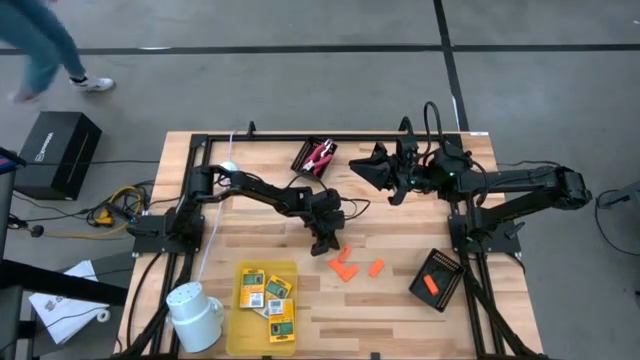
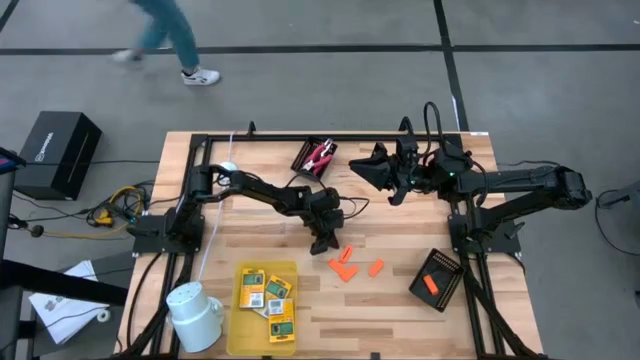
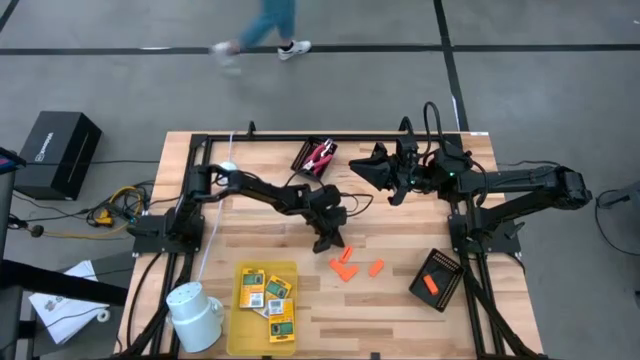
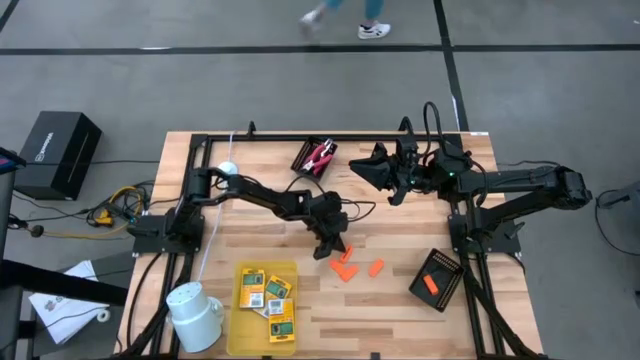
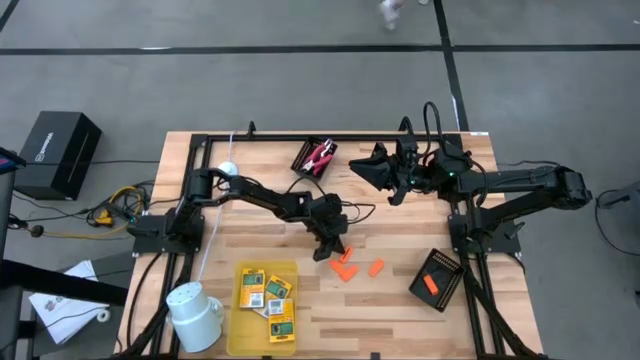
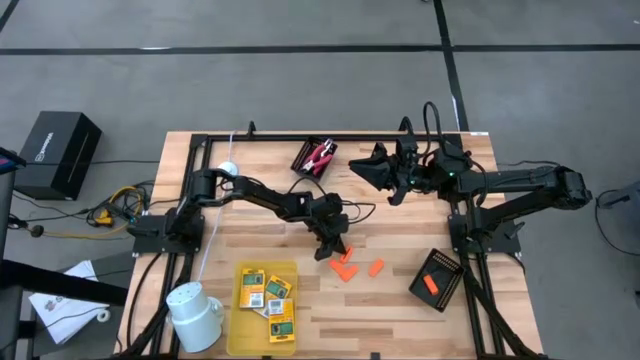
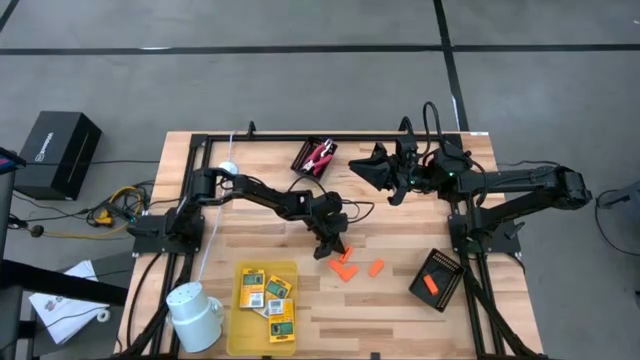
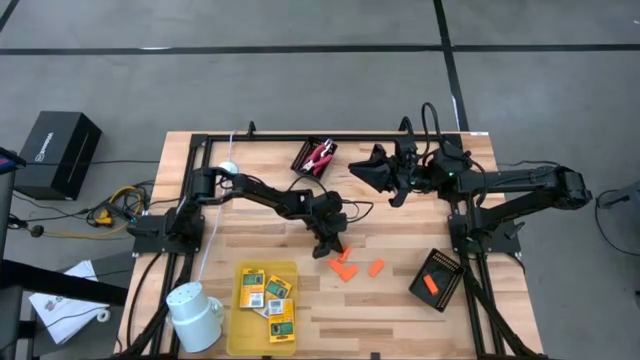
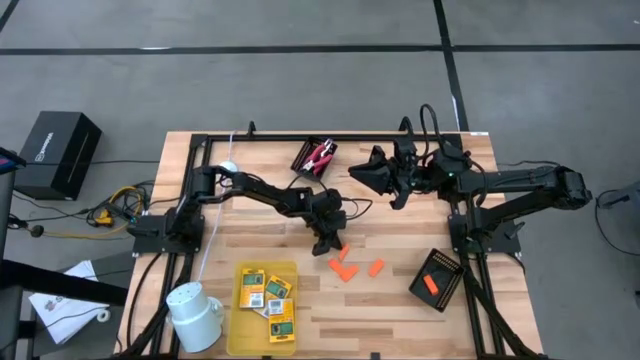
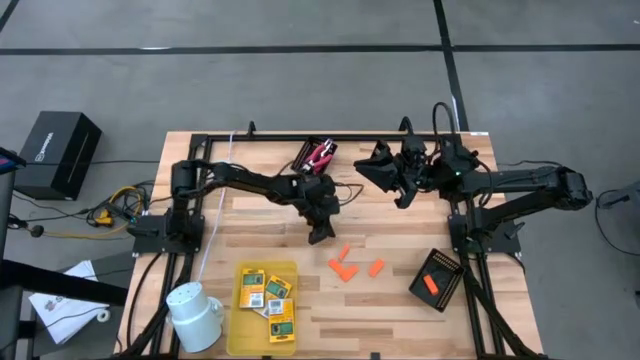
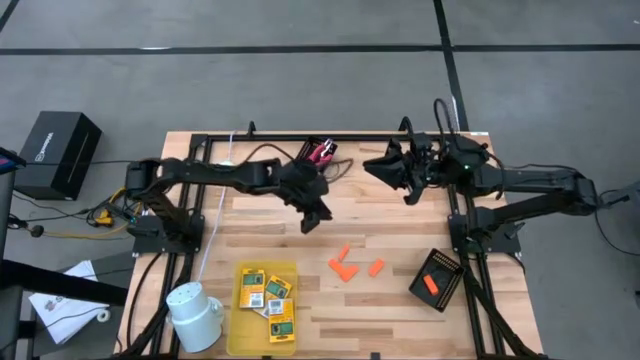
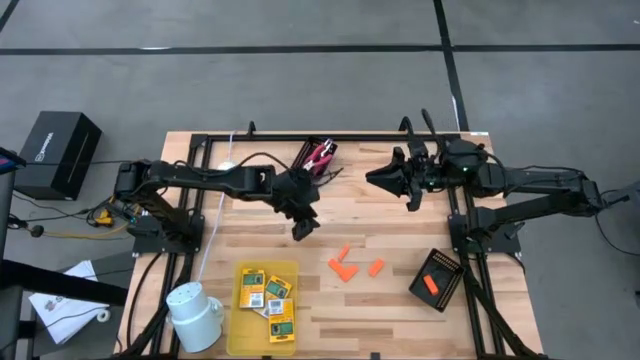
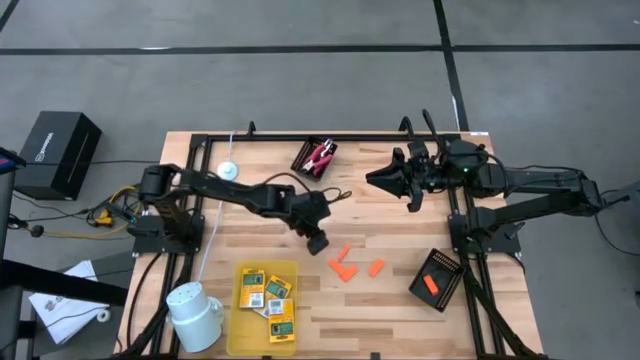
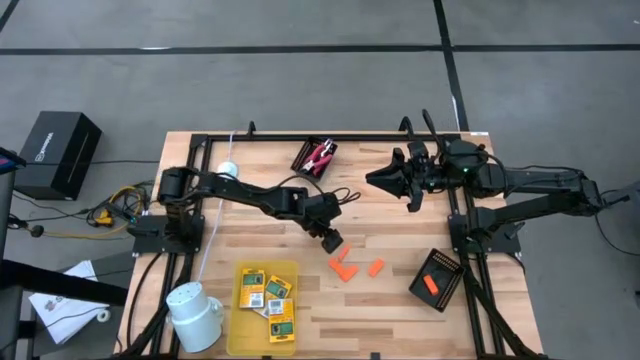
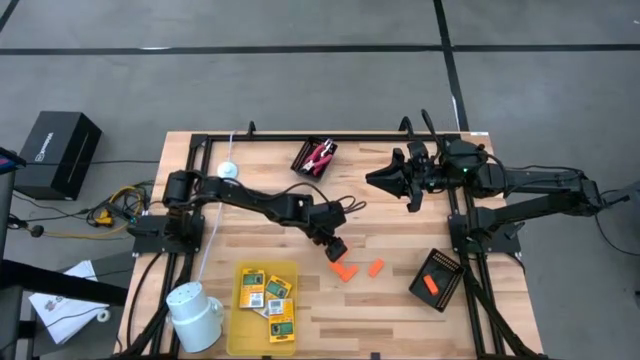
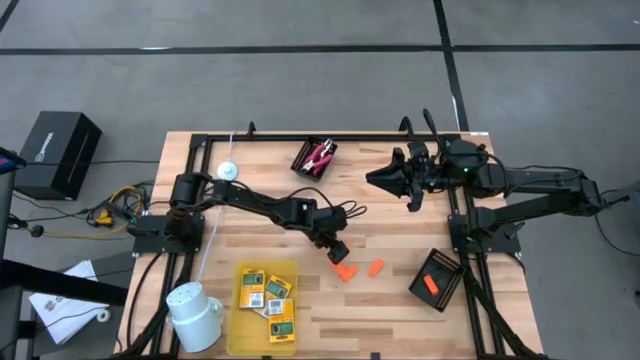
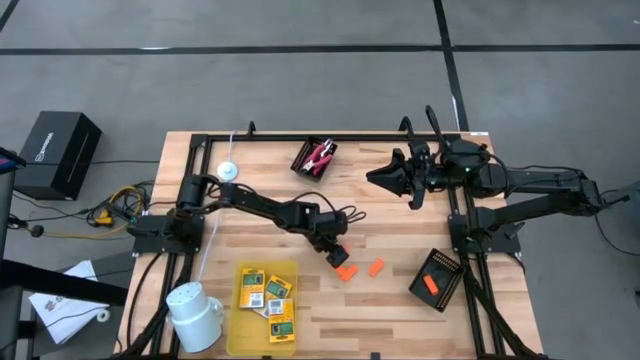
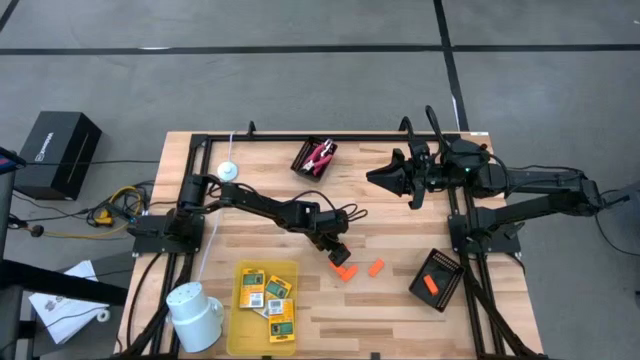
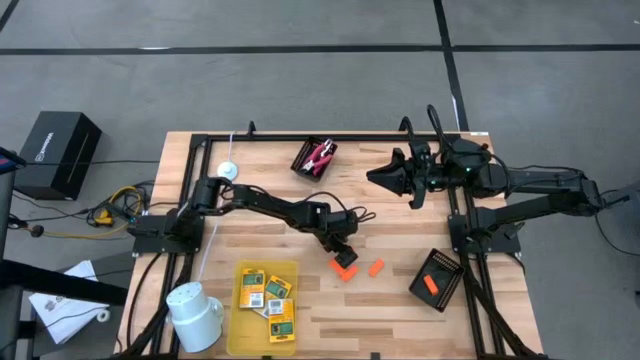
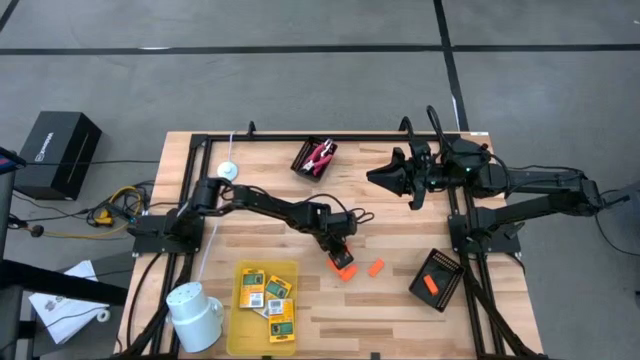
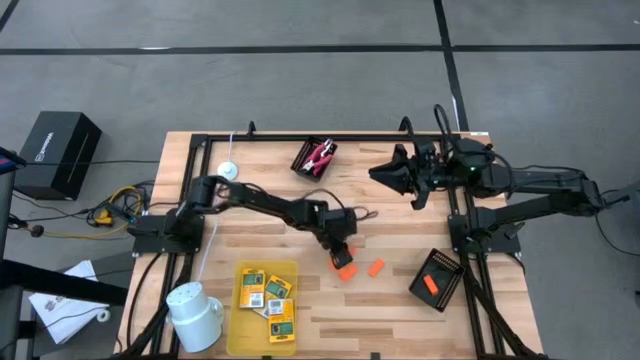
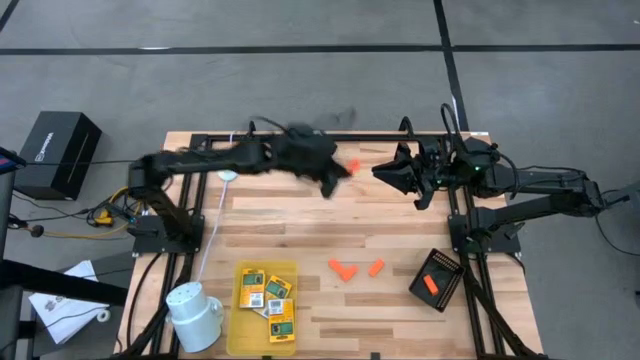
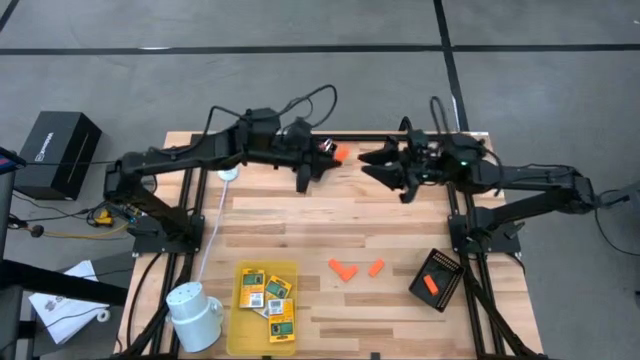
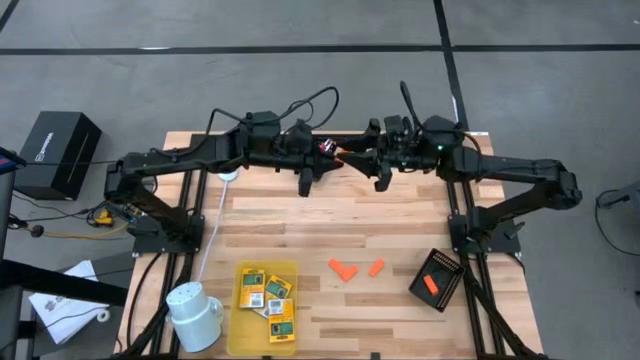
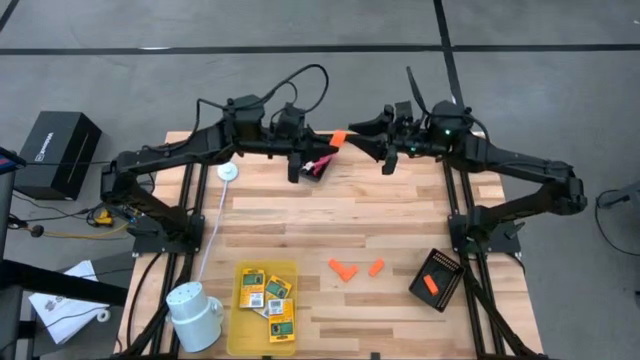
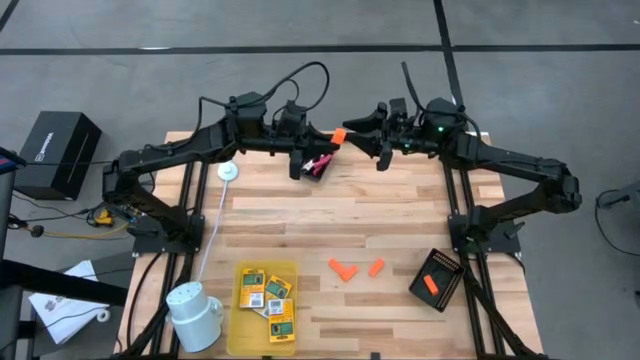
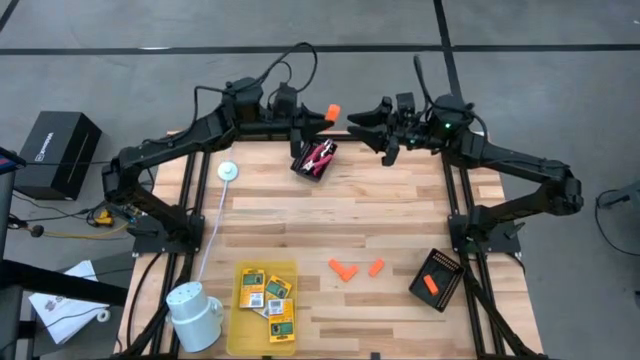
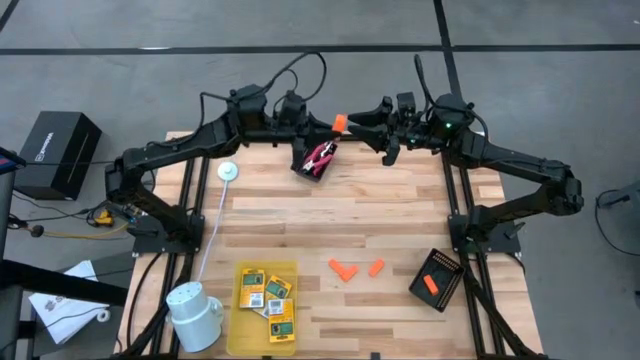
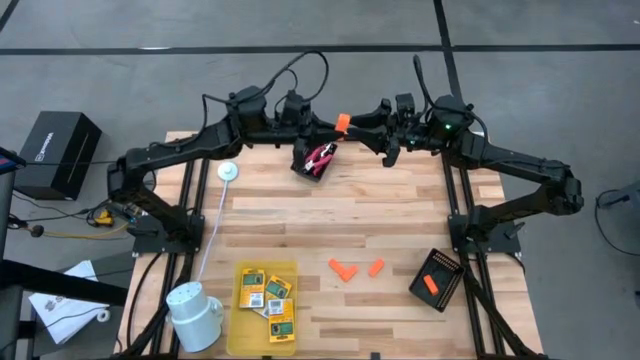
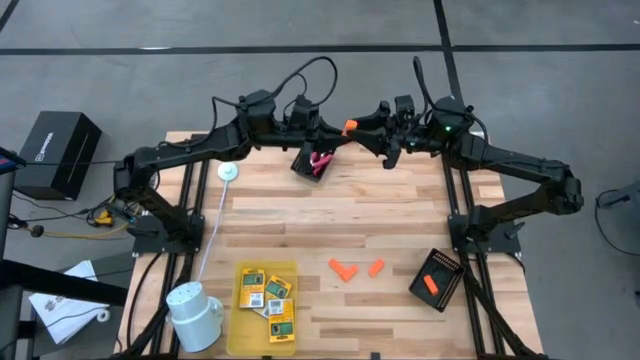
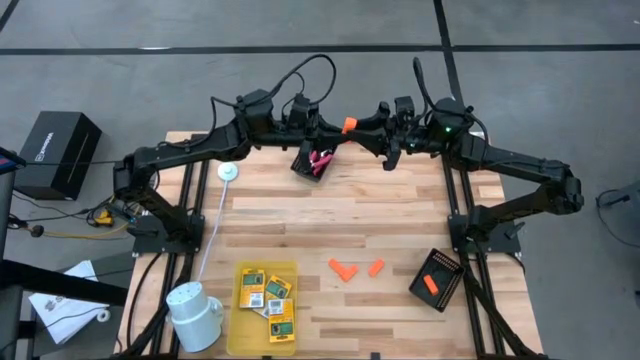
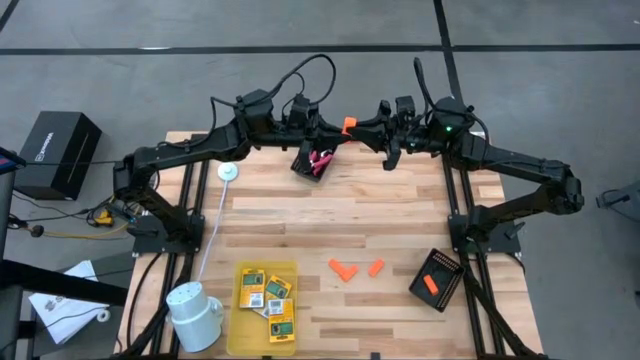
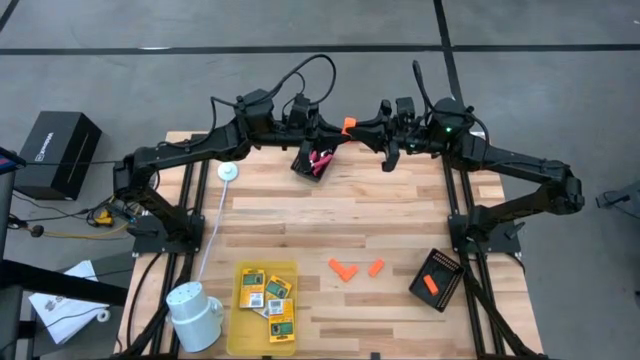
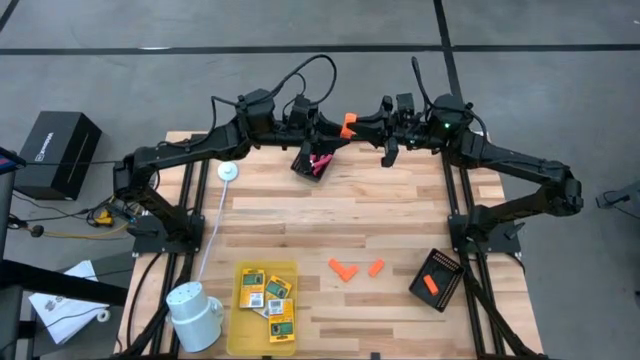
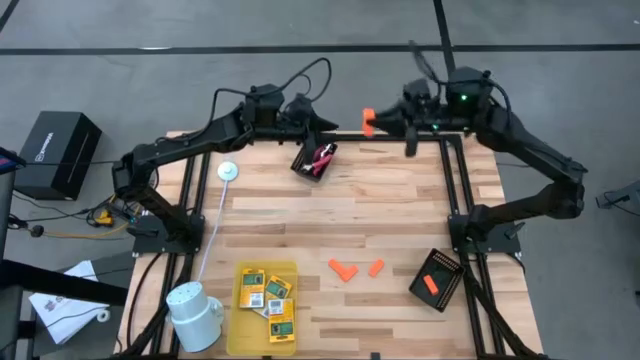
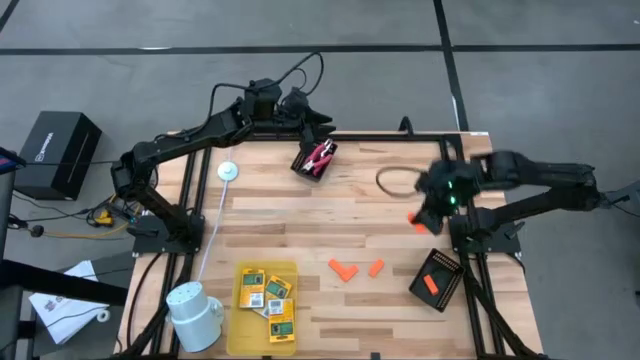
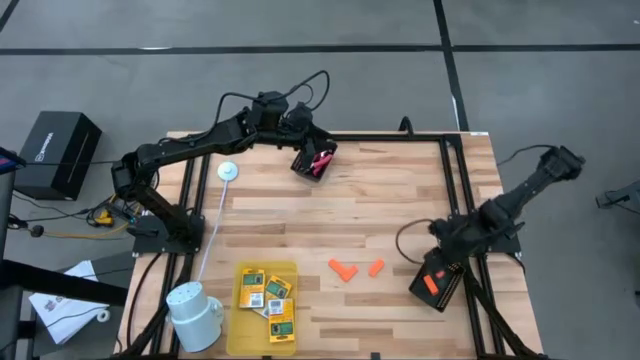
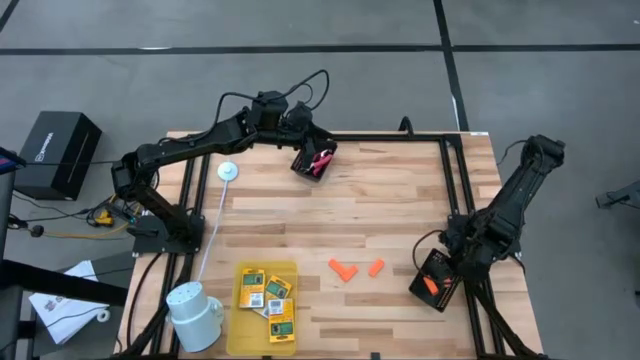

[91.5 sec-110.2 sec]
Task: Pick & Place School Supplies
Put the orange eraser into the bottom black bin

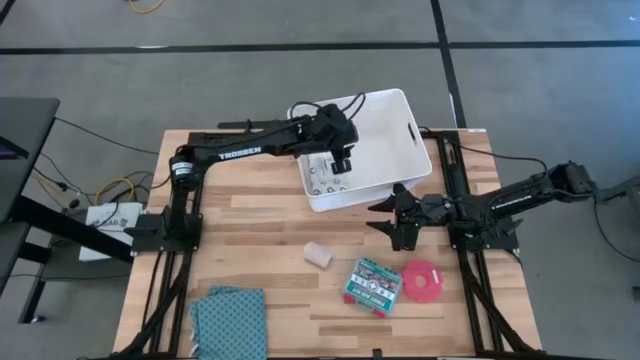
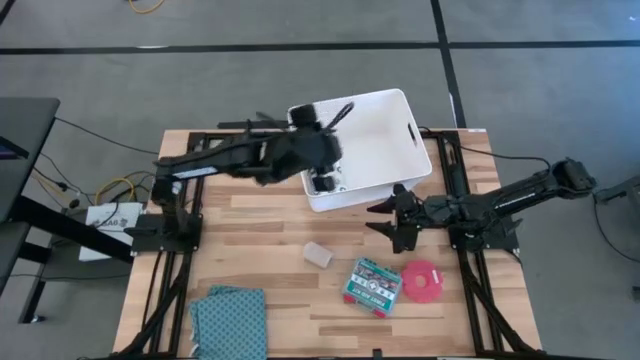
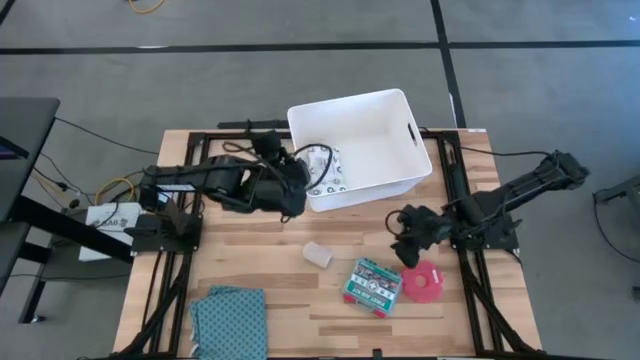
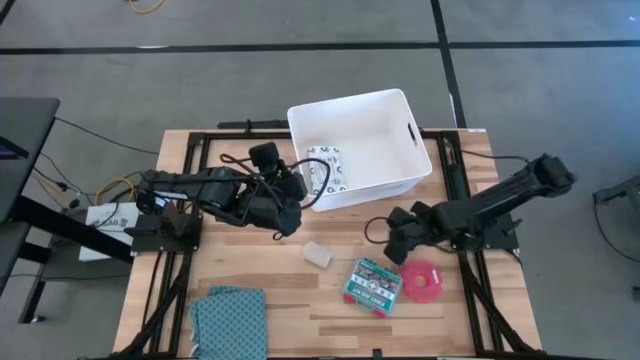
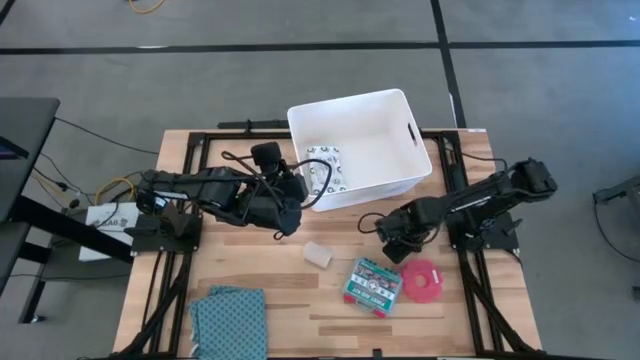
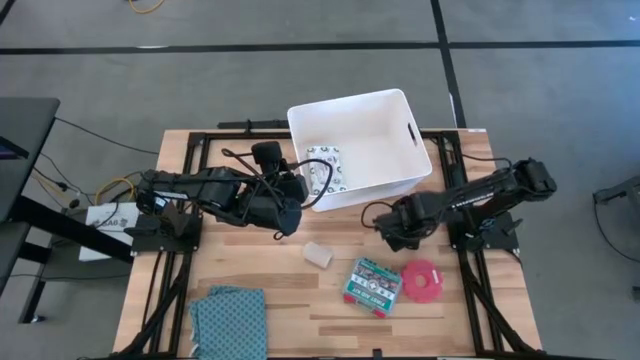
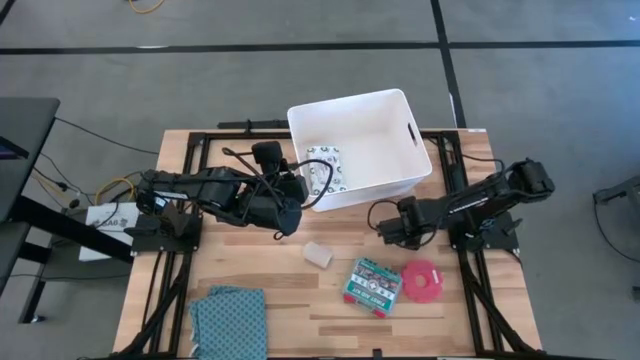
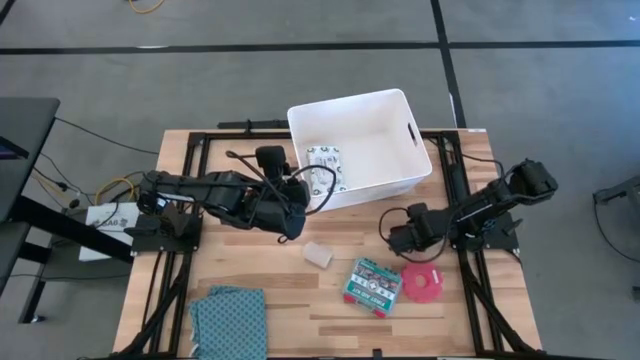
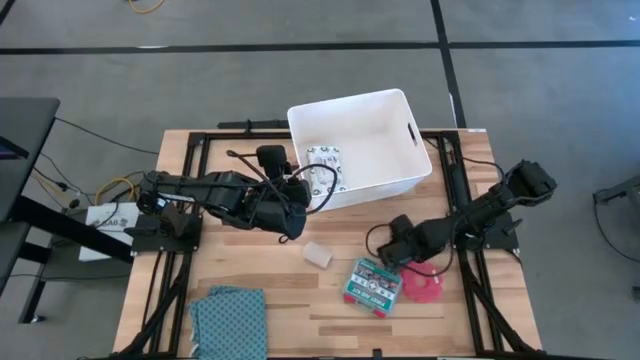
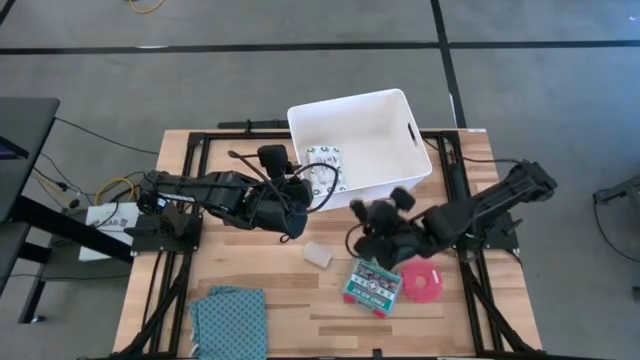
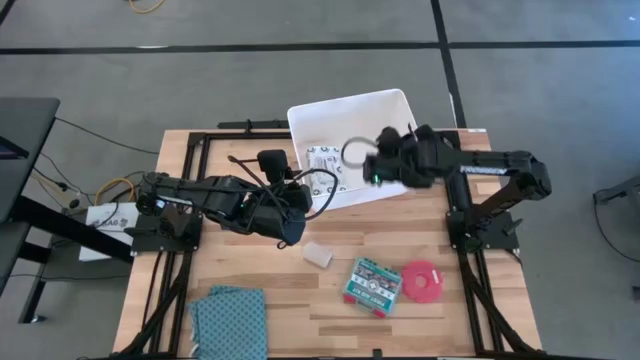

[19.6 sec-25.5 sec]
Task: Pick & place medical supplies in basket/bin
Put the black bandage into the white bin
